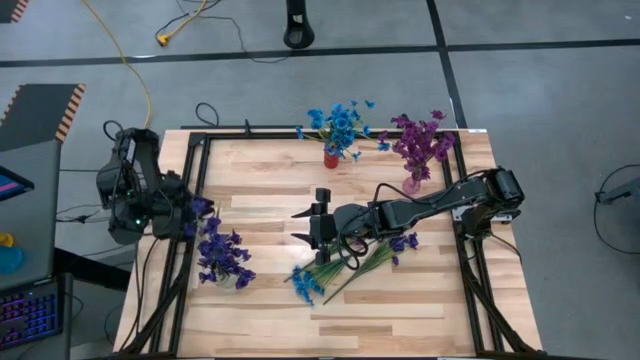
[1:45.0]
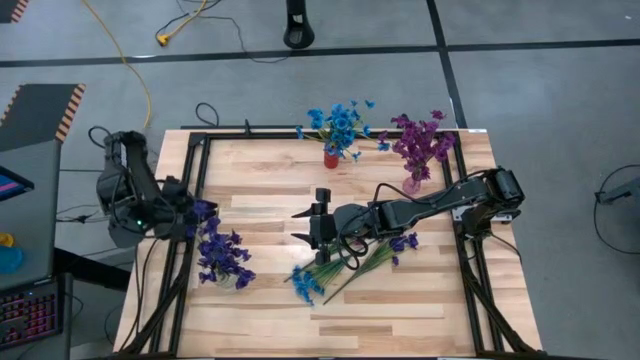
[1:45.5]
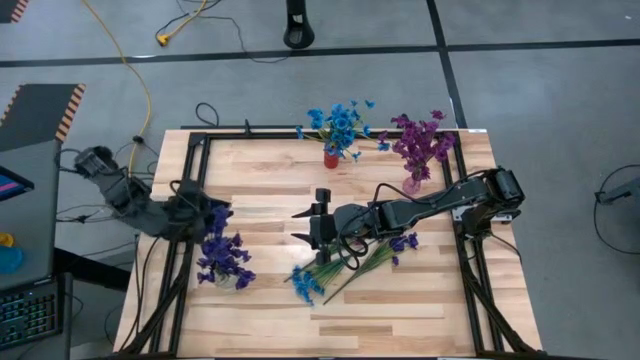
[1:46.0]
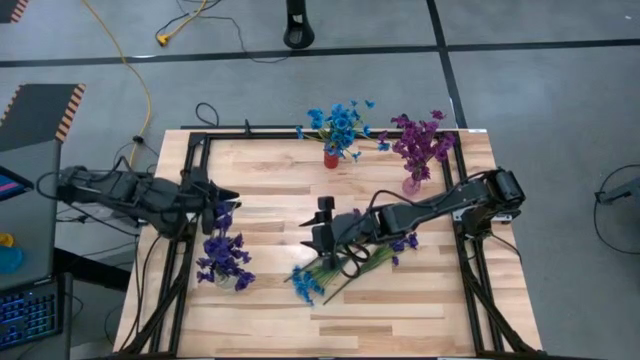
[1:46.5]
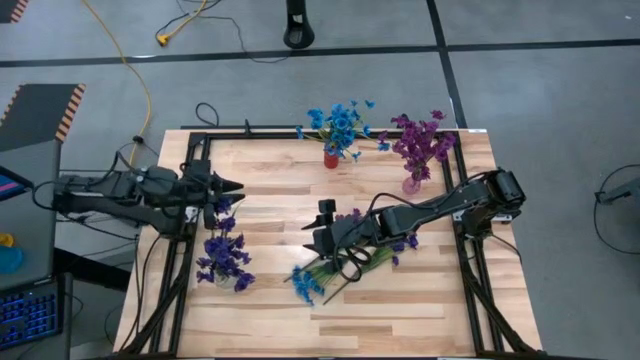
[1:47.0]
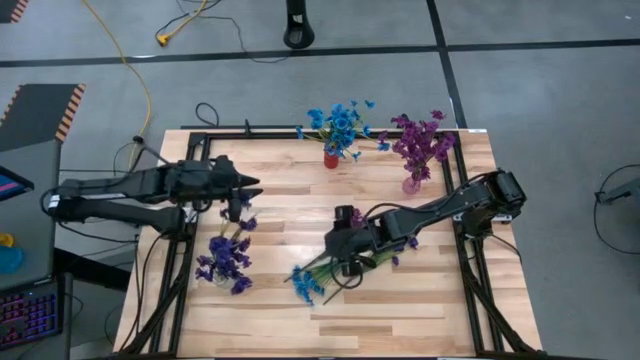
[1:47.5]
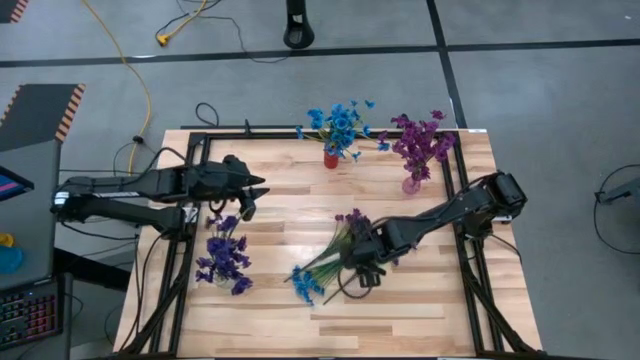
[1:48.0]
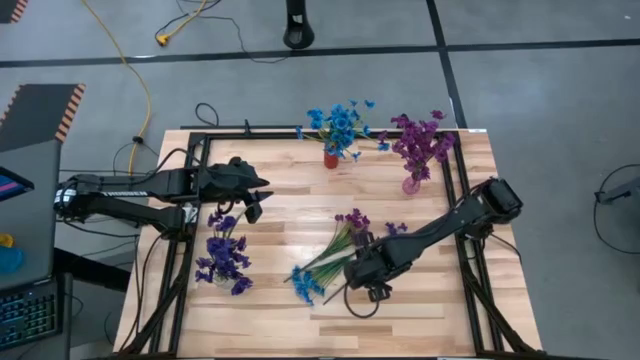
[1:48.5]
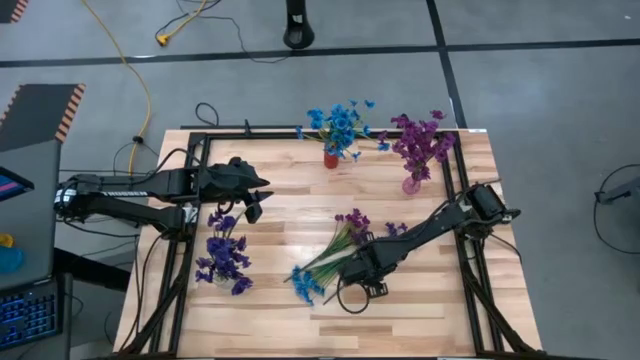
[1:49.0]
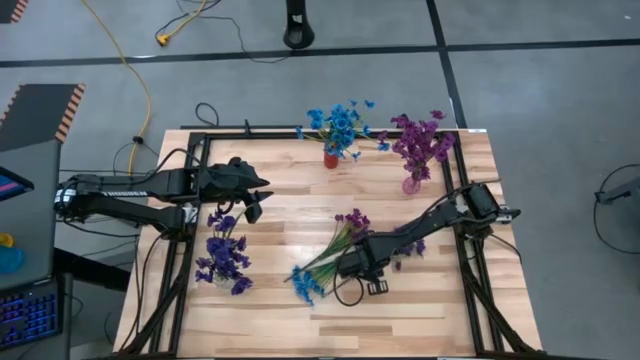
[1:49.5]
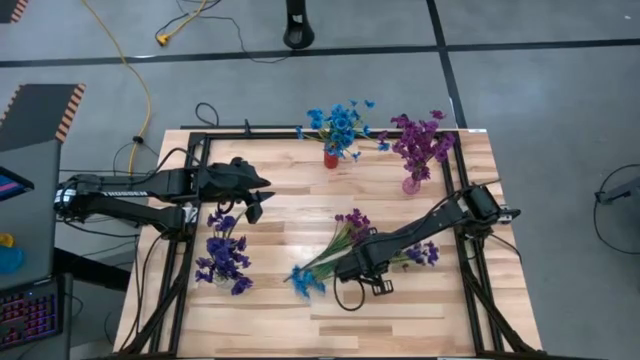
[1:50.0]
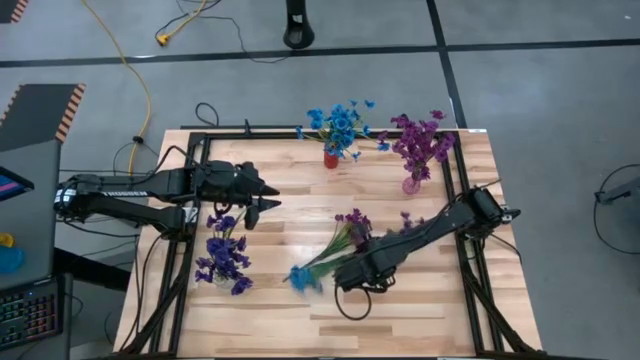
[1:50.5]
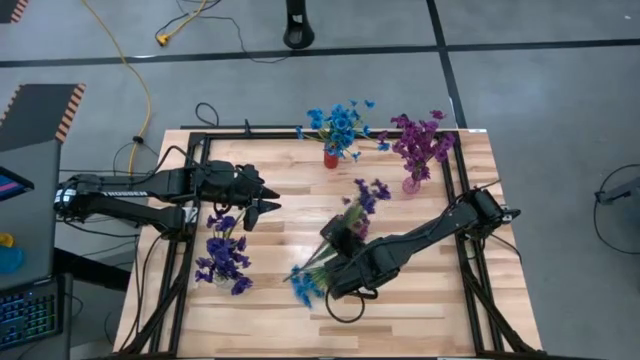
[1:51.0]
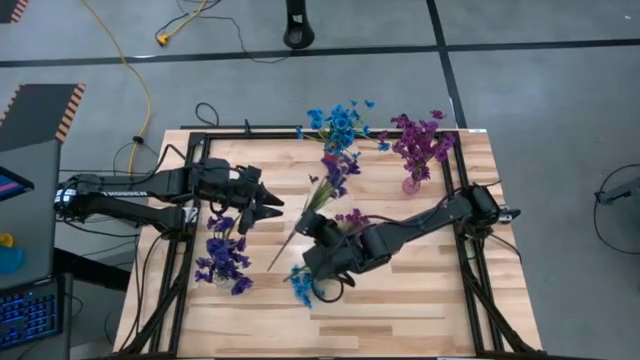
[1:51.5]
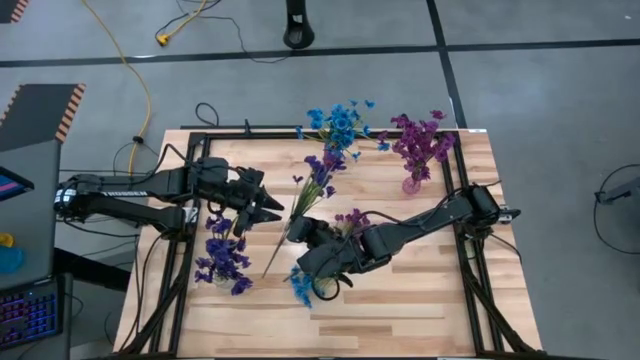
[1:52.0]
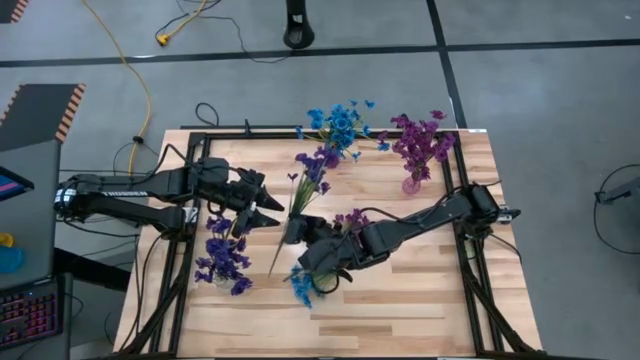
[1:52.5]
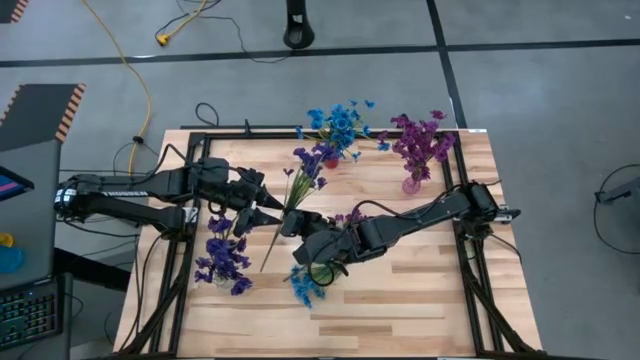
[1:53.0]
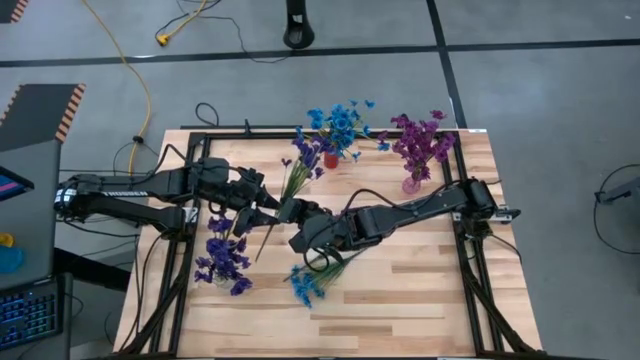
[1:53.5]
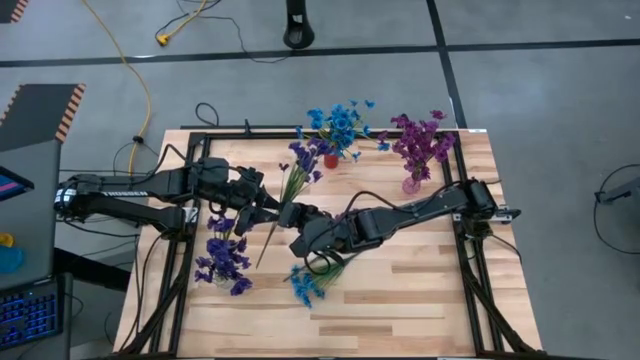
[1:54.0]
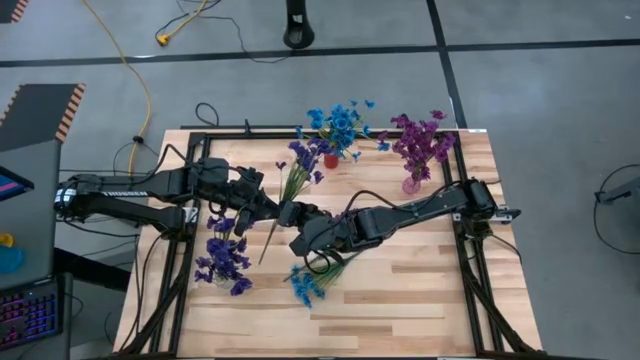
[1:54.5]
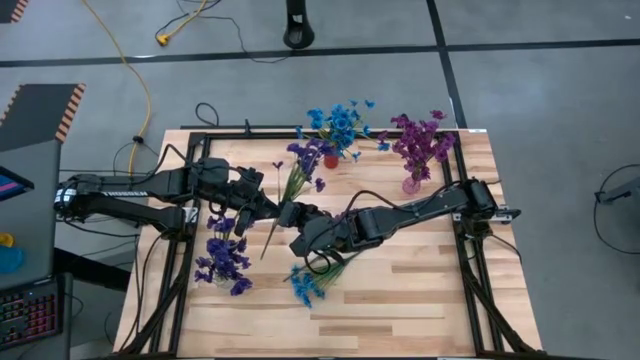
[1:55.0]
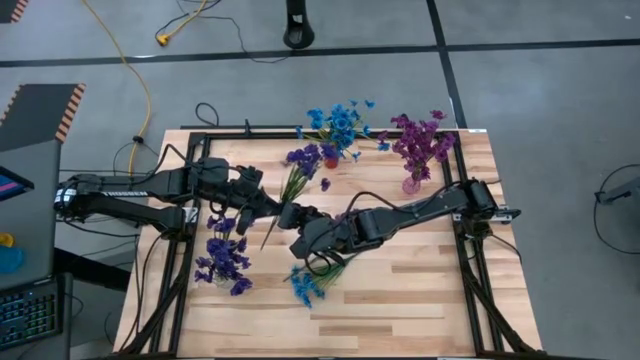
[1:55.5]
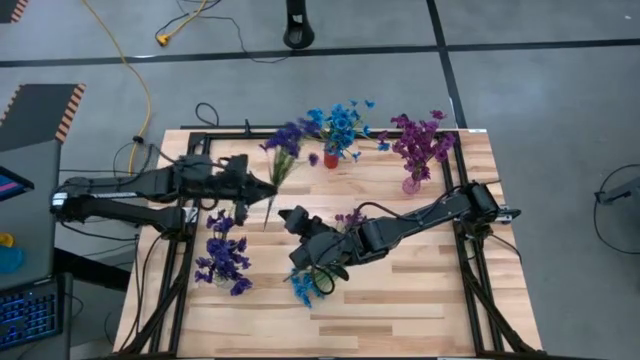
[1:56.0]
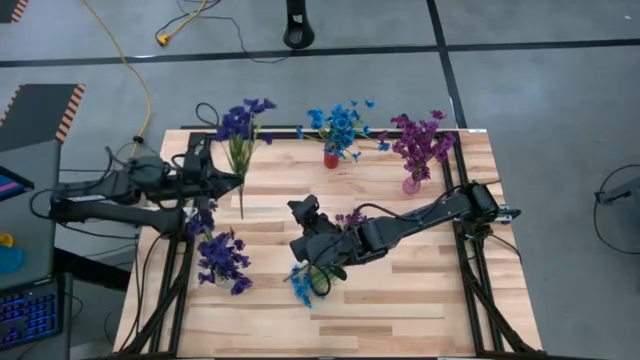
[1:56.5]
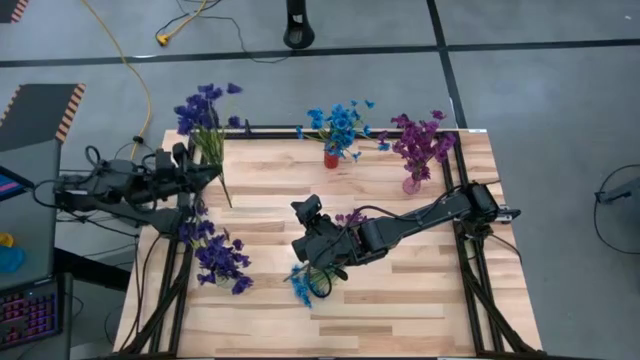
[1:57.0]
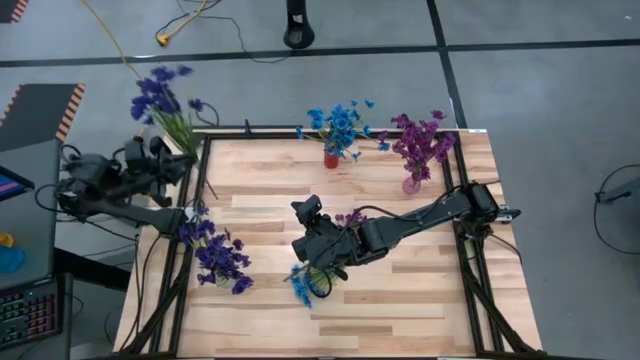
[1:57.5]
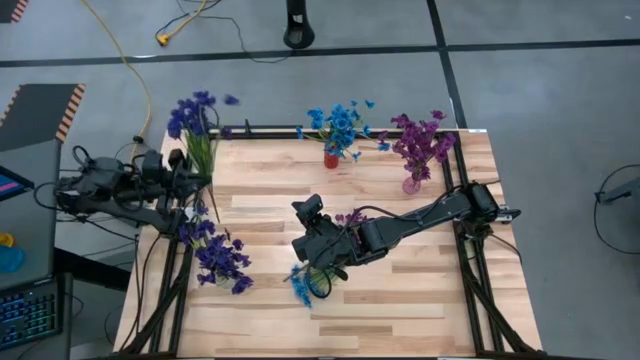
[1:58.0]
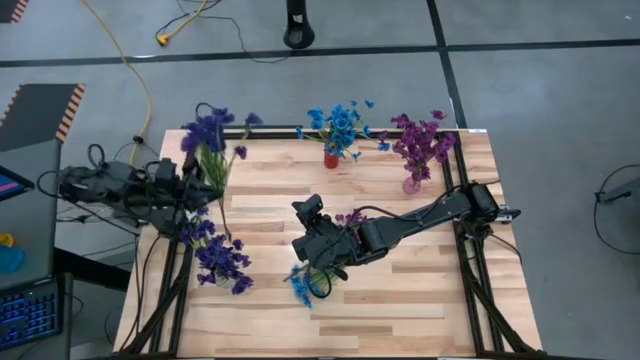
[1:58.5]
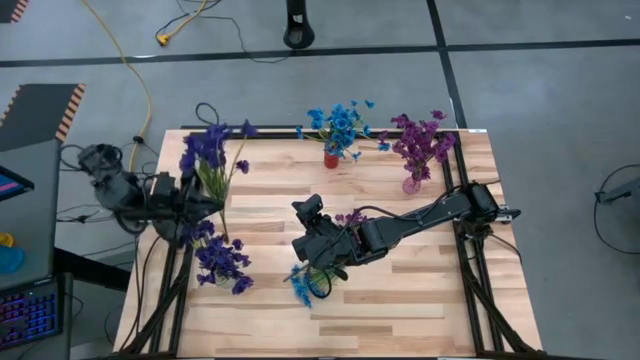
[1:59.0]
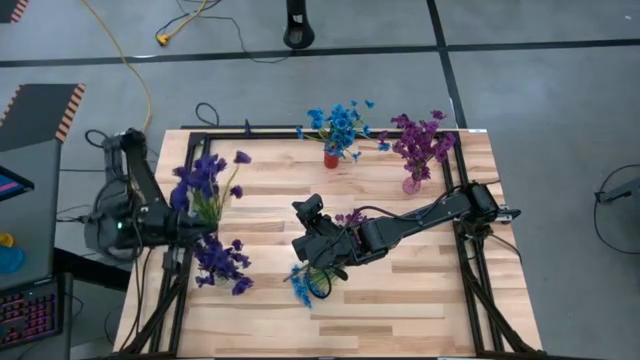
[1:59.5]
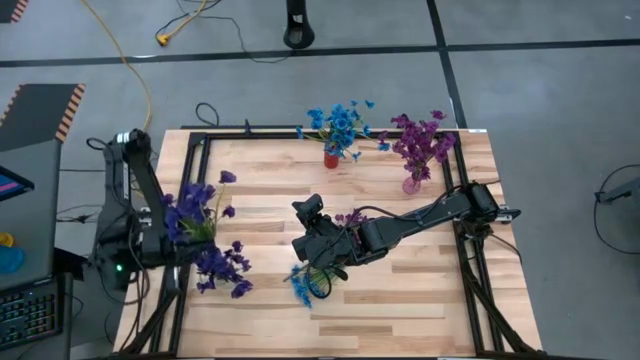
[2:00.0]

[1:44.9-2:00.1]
Task: Sort flowers into vase by color
Put the dark blue flowers into the transparent vase

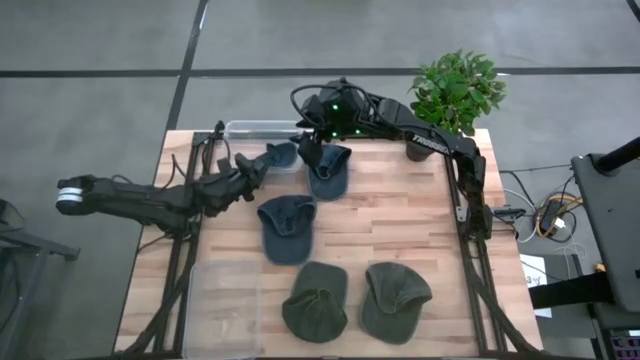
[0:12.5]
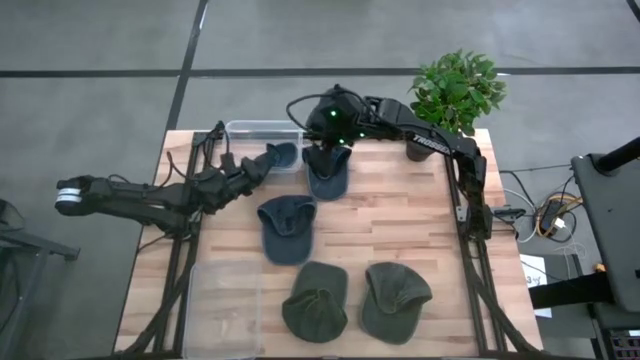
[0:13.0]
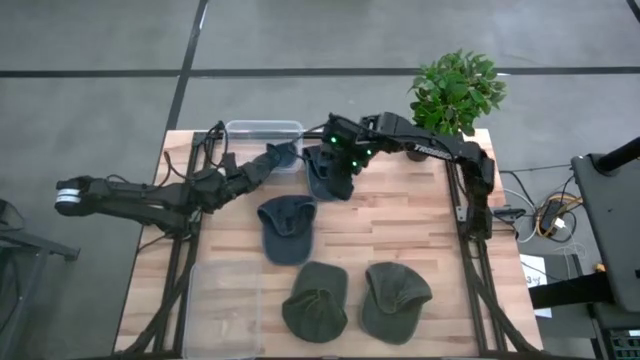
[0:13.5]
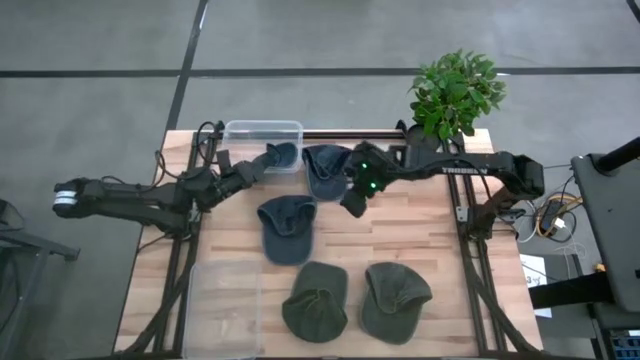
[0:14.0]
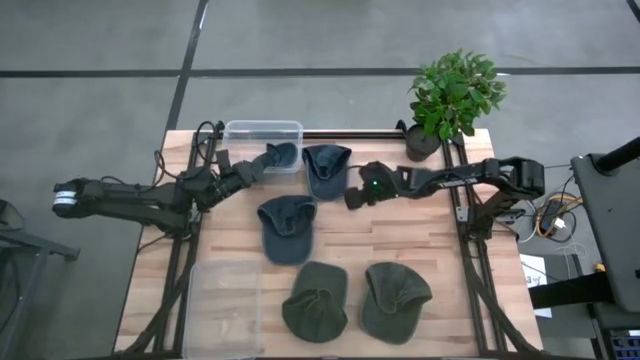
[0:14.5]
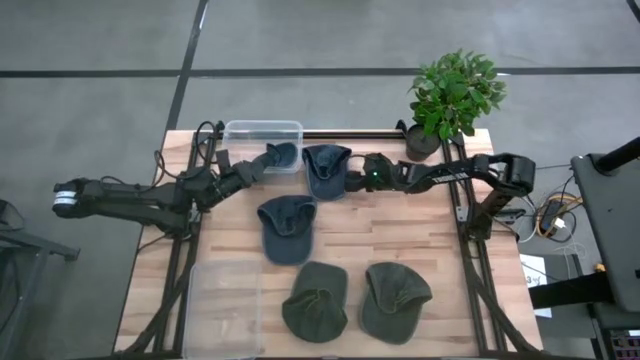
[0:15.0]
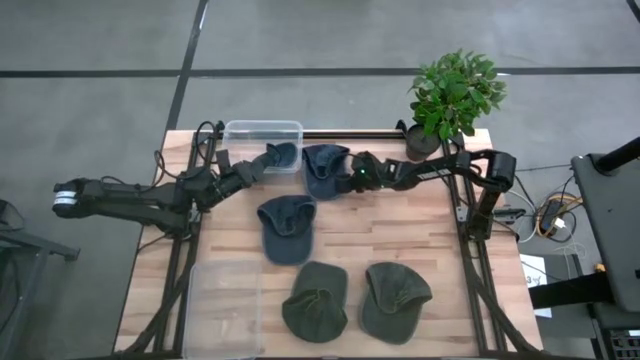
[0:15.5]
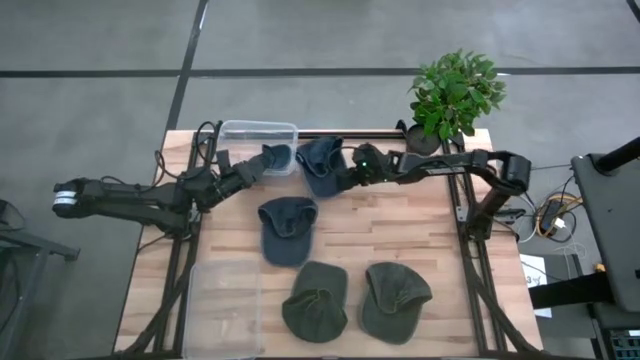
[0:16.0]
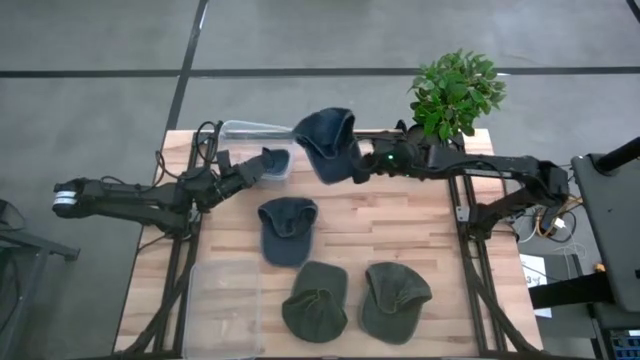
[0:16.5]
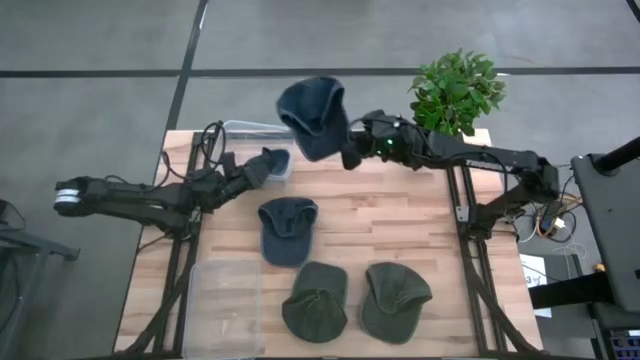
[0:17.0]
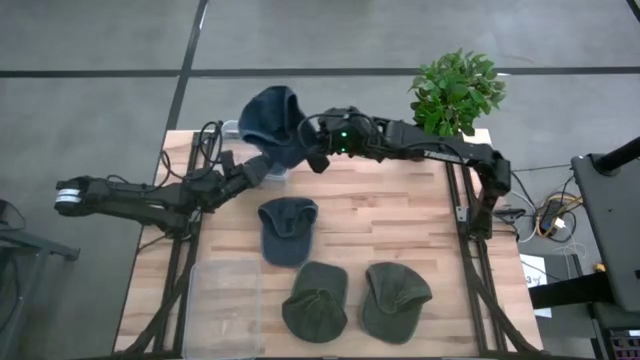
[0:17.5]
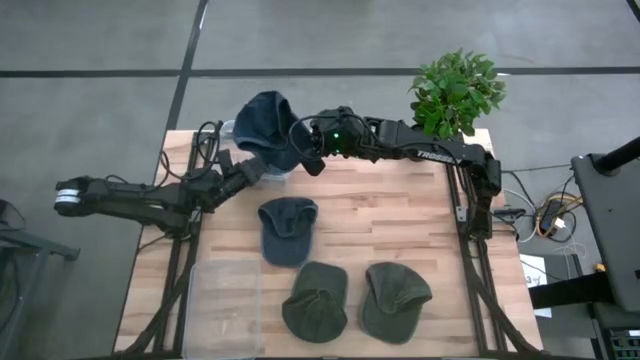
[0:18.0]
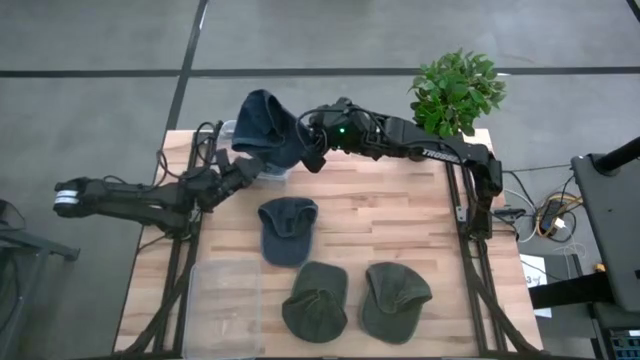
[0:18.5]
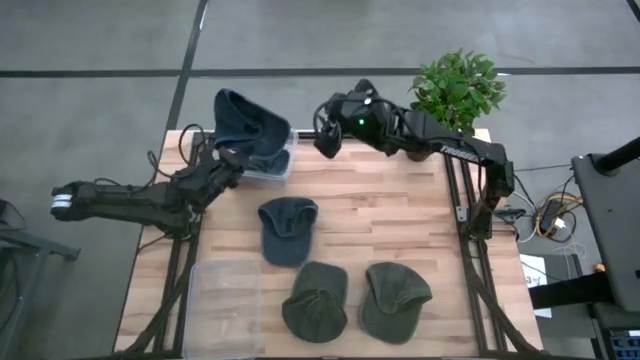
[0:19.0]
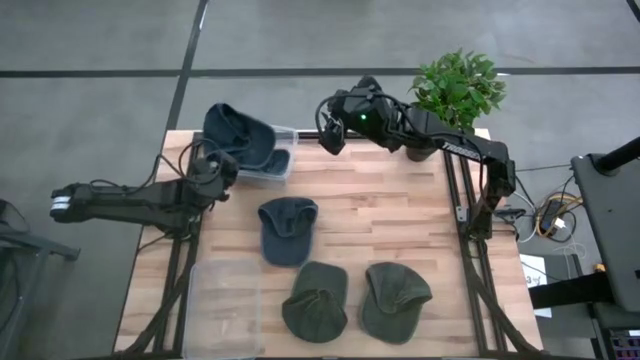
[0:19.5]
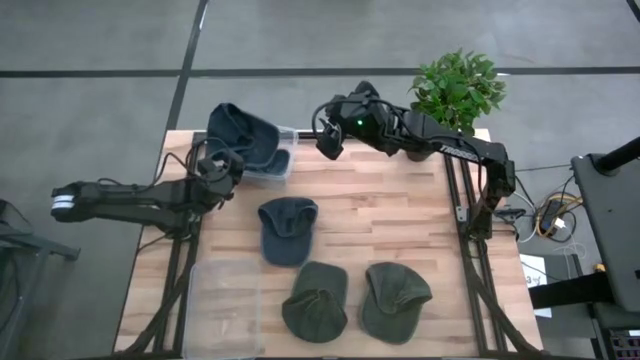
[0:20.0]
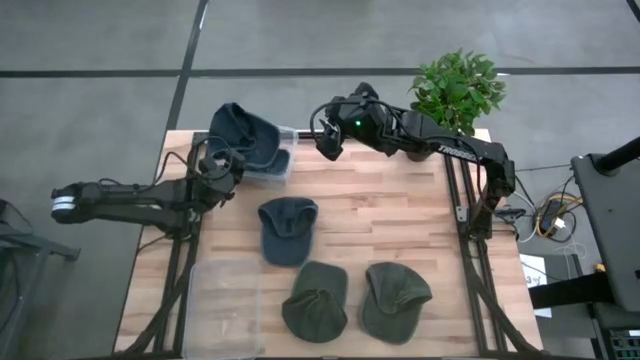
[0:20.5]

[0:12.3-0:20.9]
Task: Pick & Place hat
Put the top blue cap into the top transparent bin
